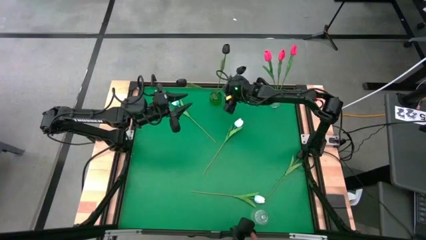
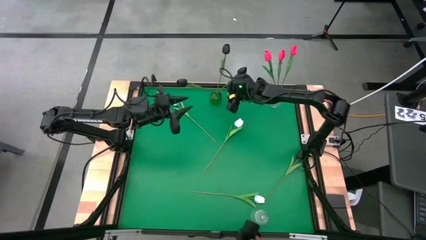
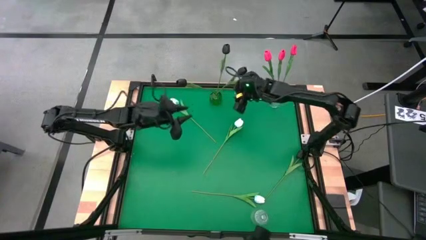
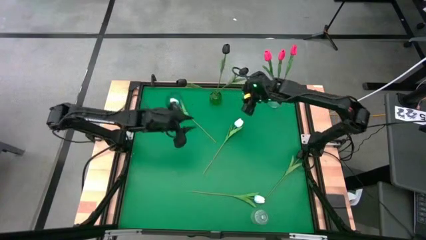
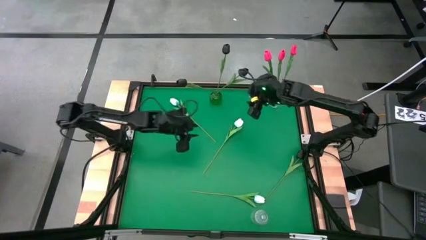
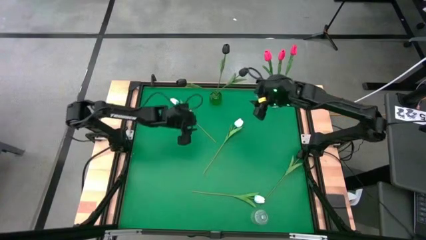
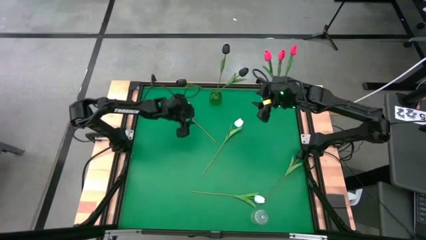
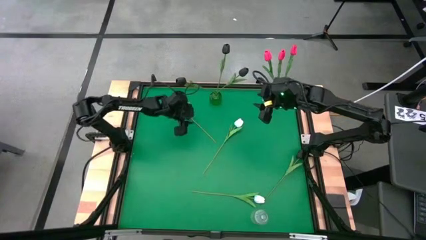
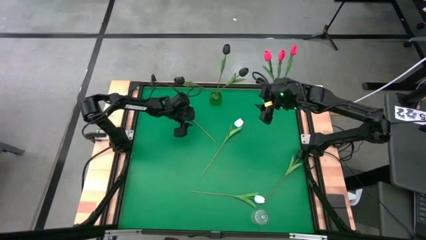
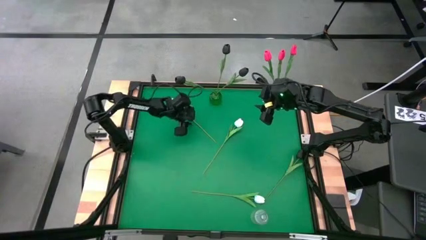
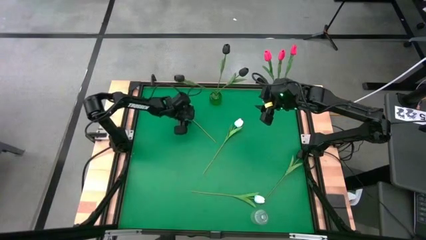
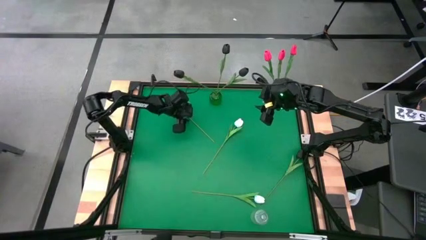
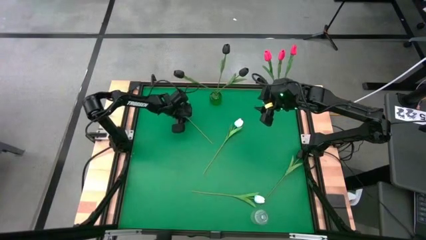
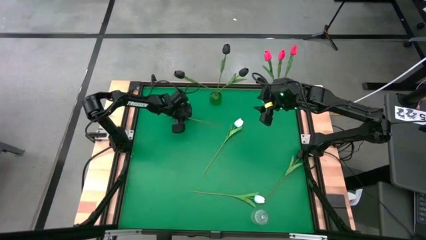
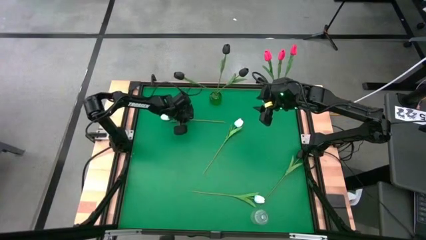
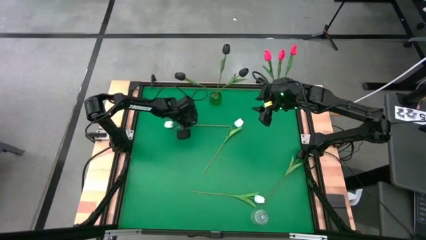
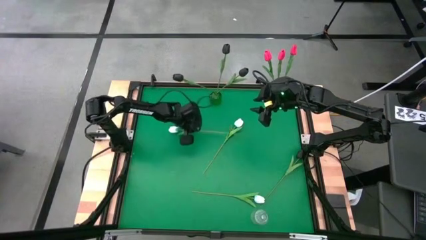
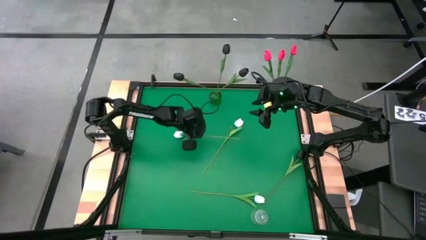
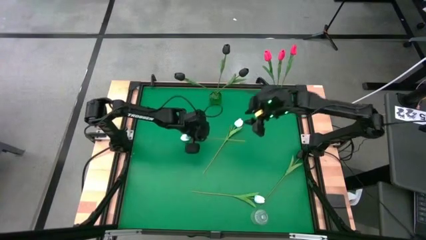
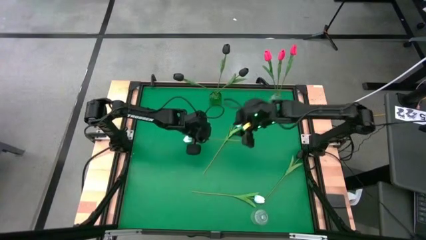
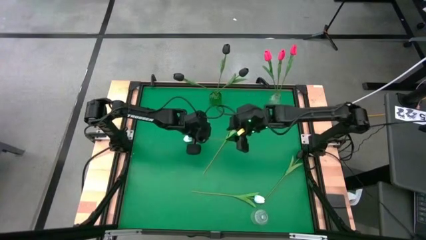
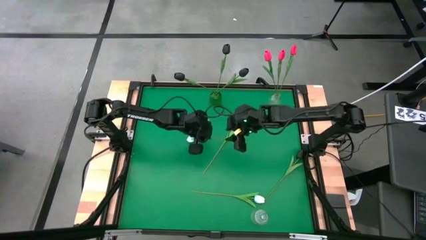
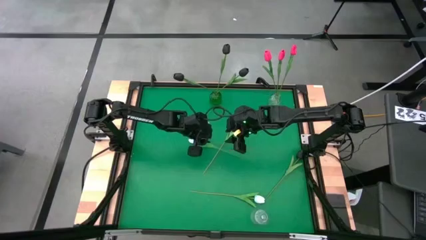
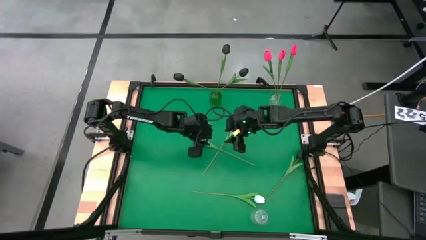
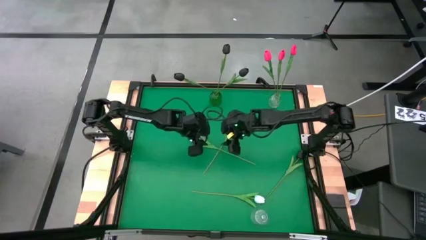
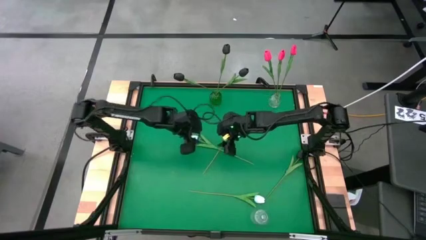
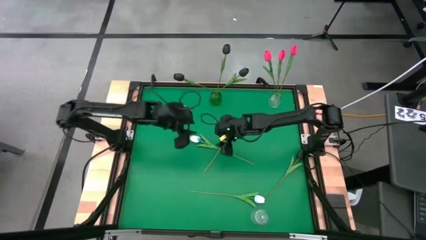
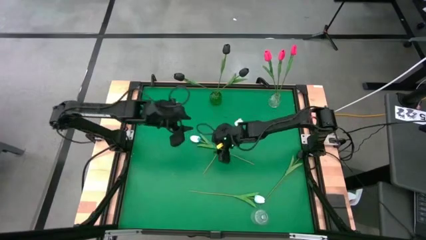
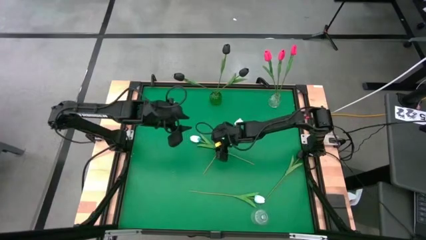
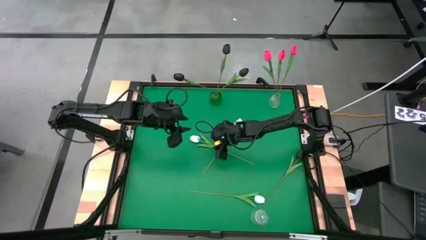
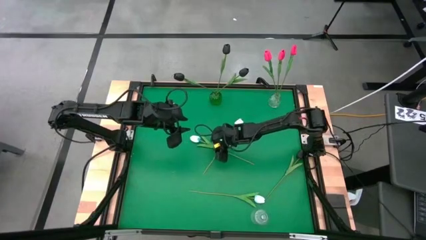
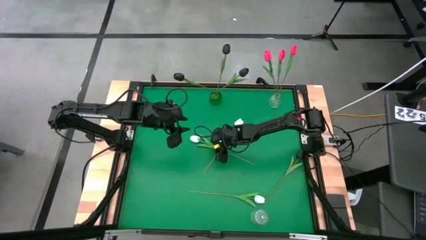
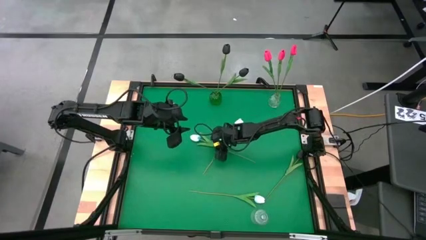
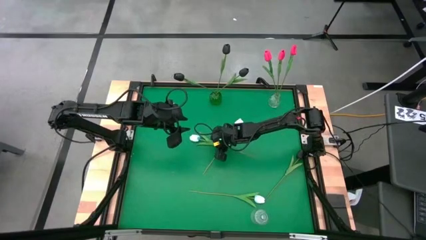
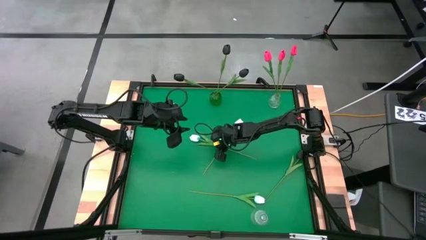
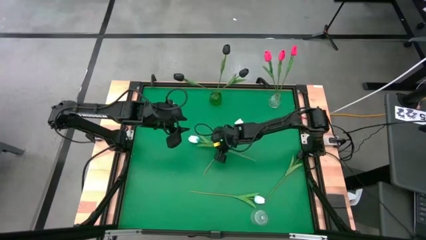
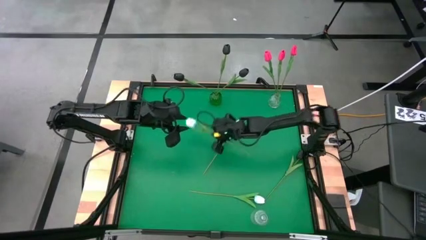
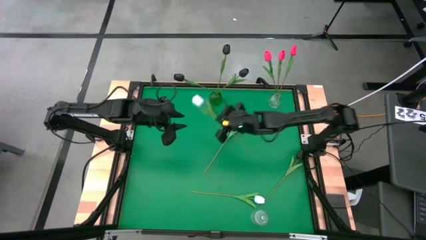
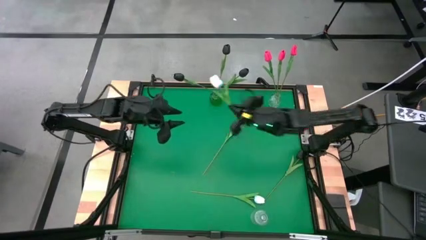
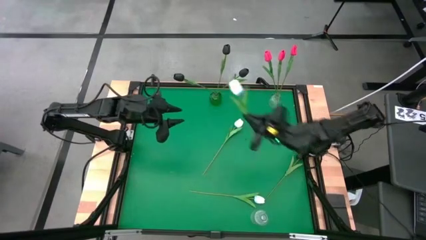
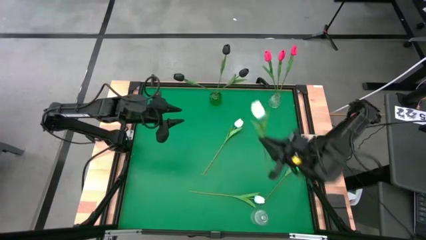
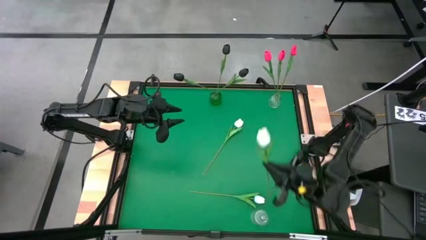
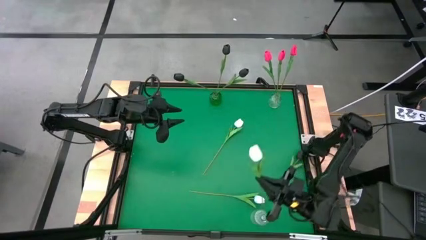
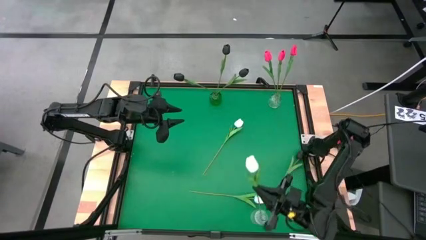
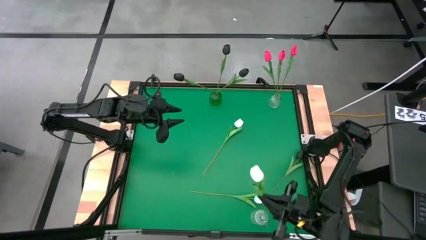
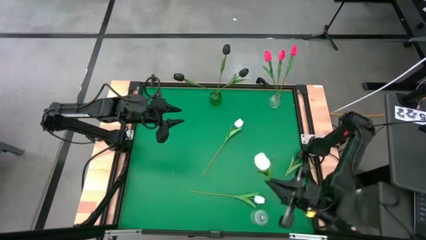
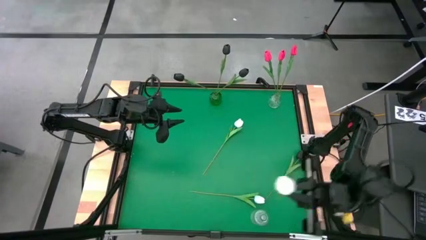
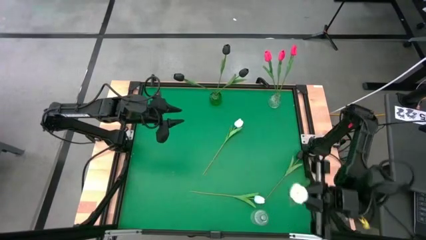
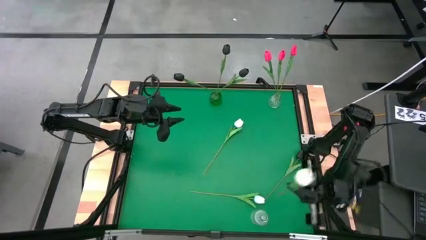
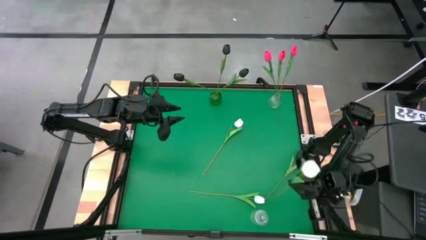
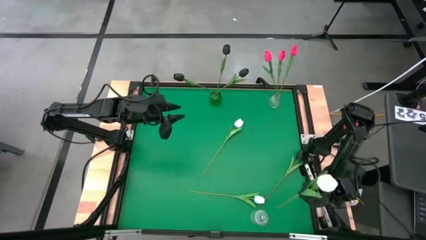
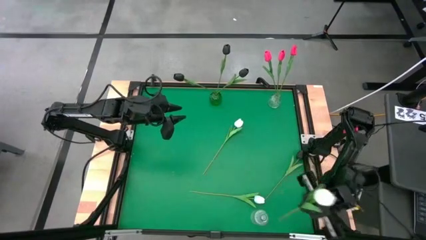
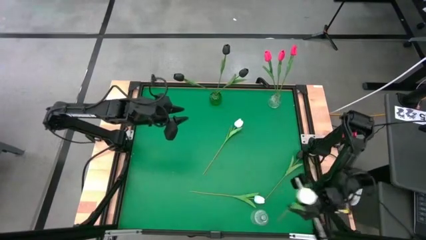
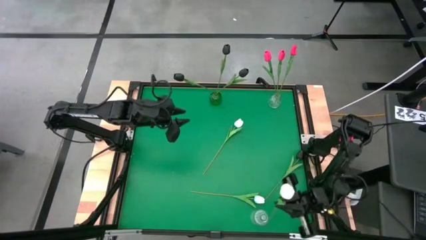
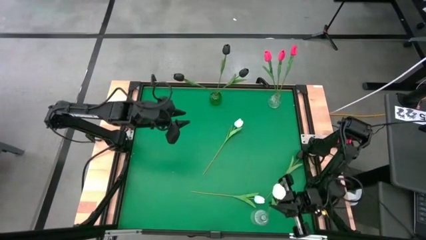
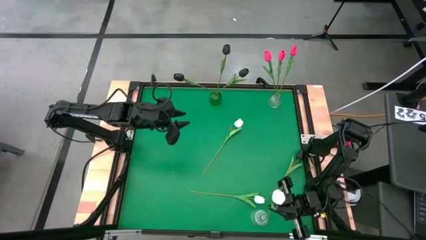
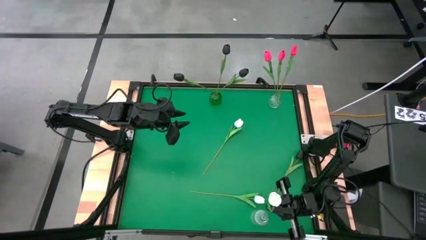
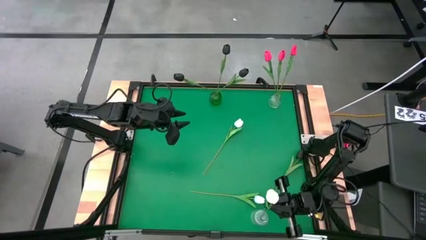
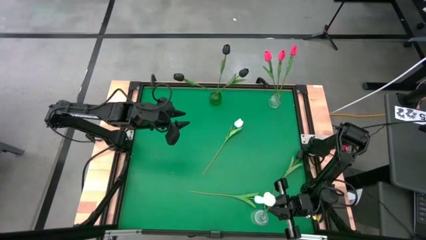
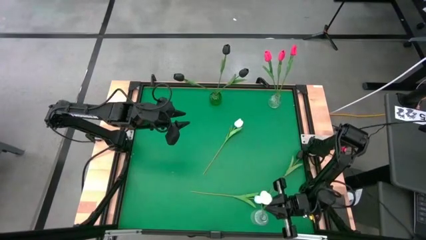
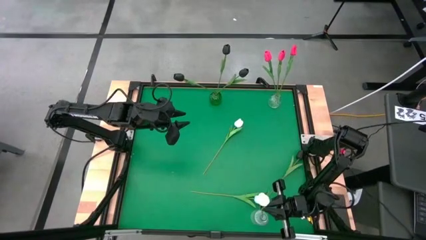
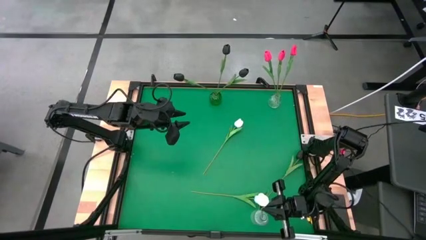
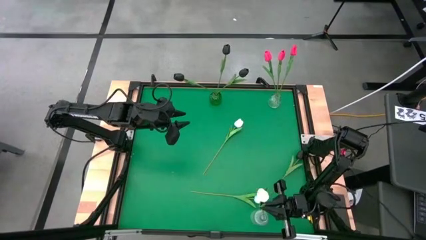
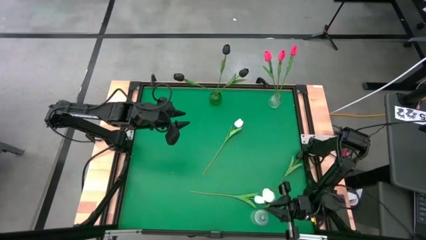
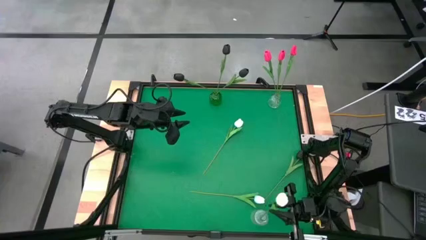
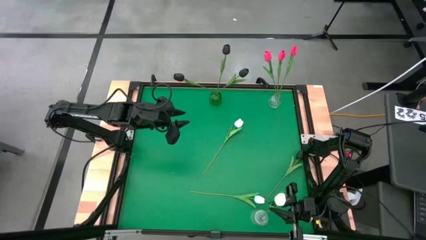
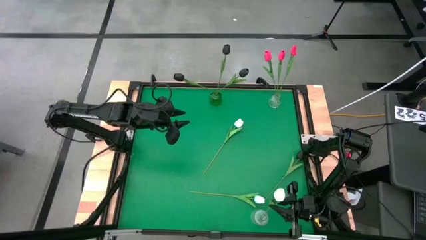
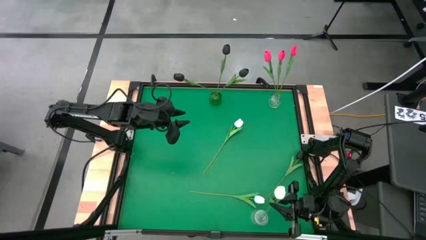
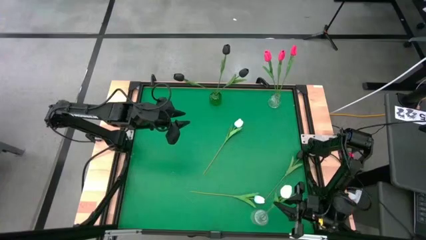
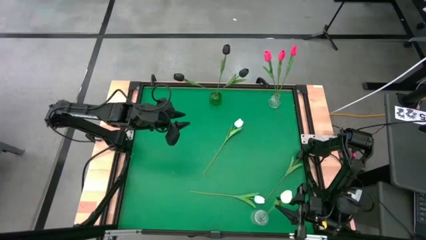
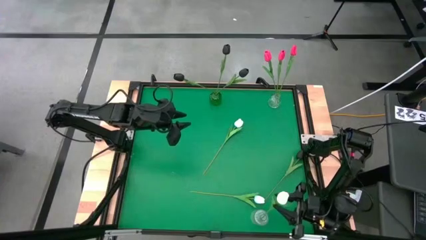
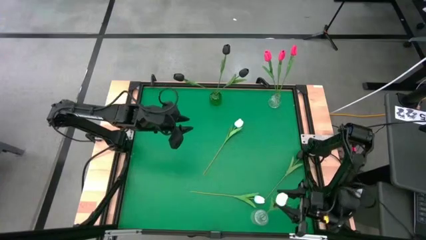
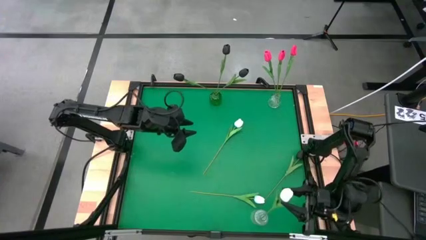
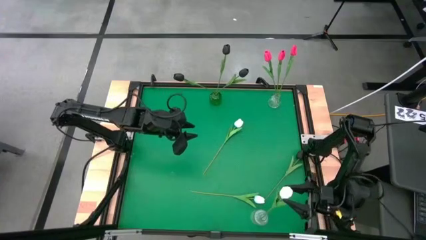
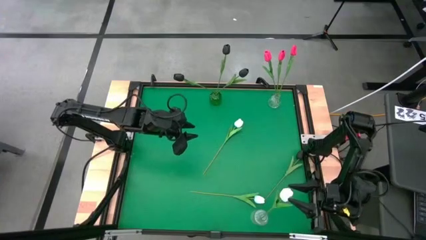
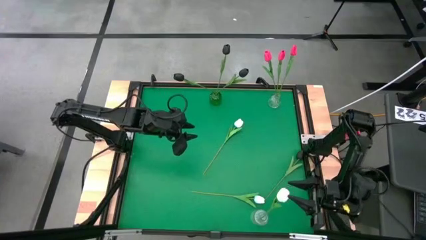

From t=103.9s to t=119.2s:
Task: Sort flowers into vase by color
Put the white tulip into the bottom transparent vase
